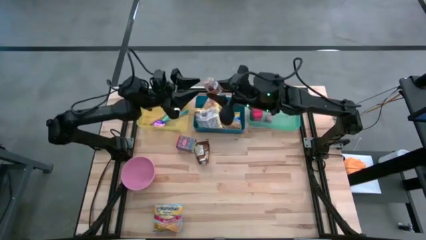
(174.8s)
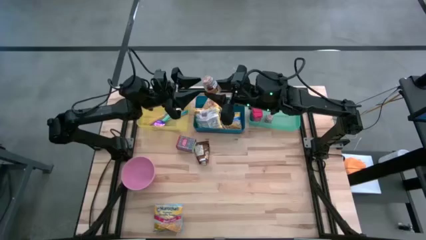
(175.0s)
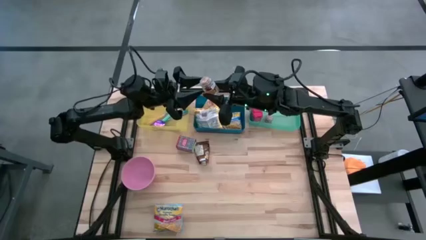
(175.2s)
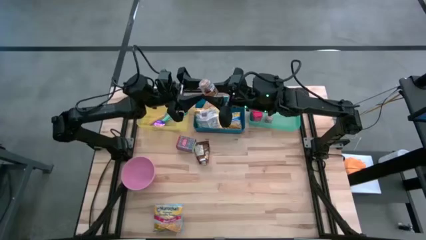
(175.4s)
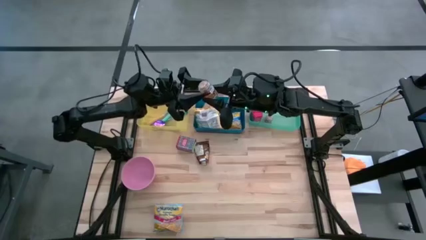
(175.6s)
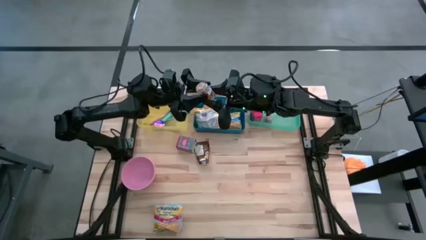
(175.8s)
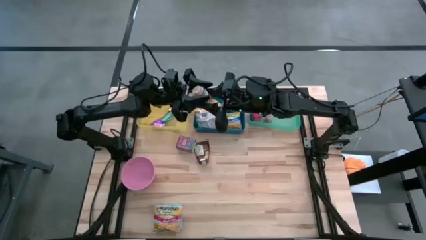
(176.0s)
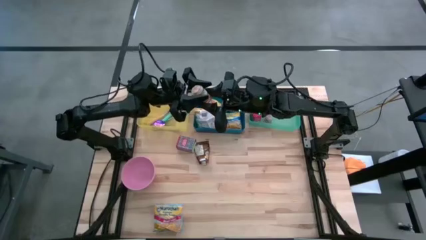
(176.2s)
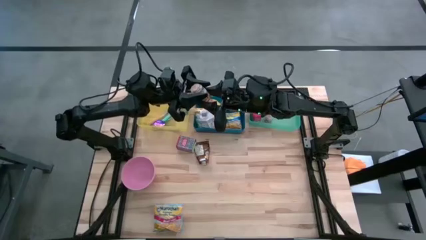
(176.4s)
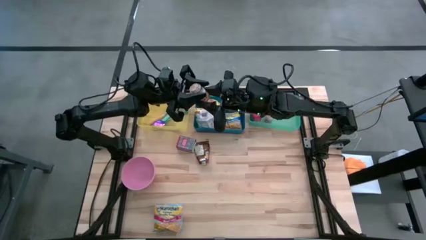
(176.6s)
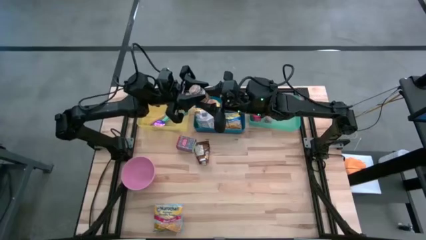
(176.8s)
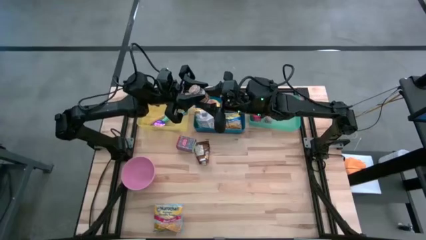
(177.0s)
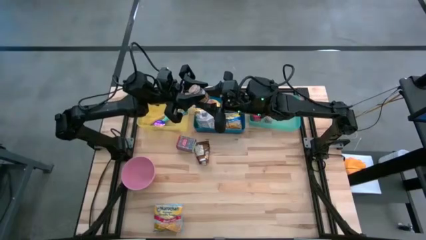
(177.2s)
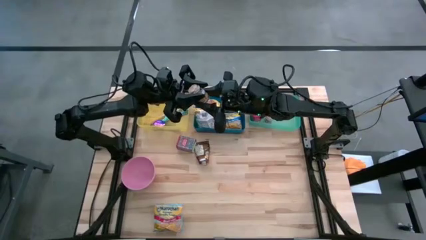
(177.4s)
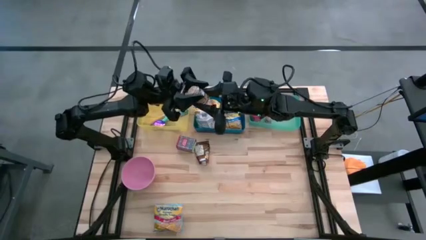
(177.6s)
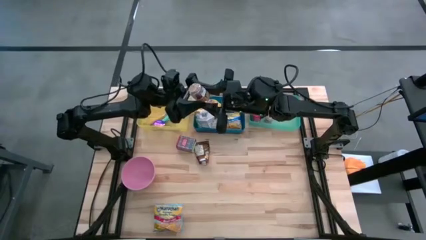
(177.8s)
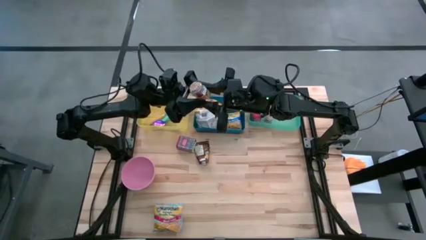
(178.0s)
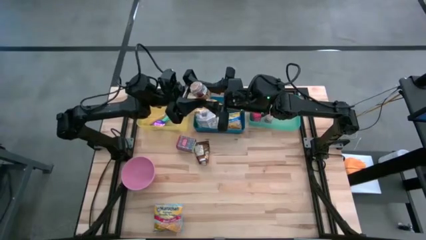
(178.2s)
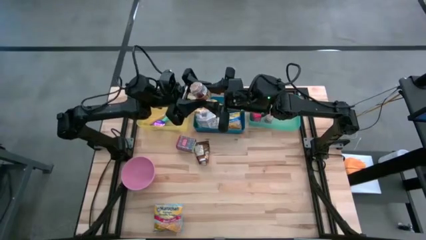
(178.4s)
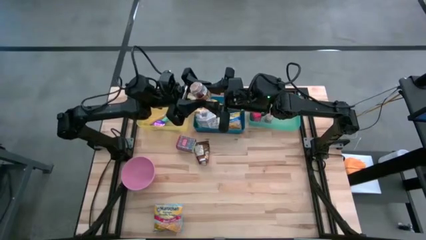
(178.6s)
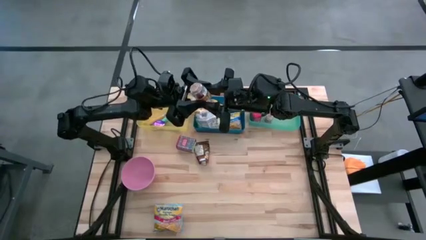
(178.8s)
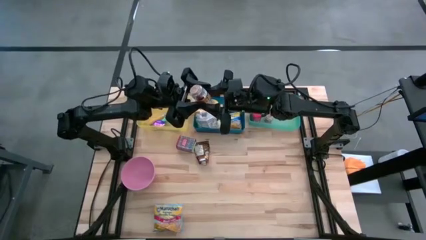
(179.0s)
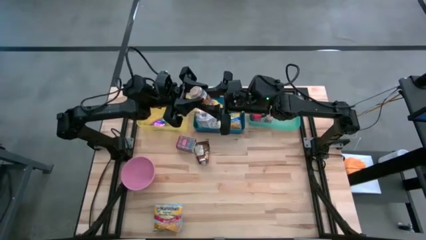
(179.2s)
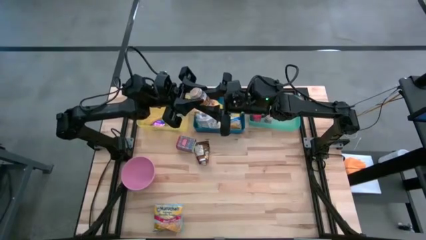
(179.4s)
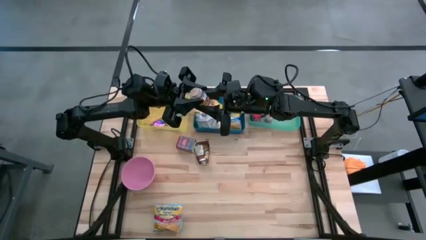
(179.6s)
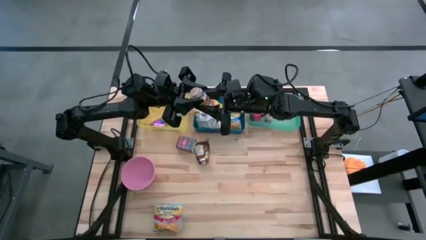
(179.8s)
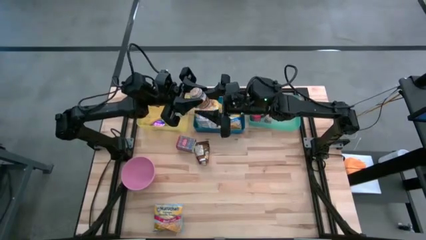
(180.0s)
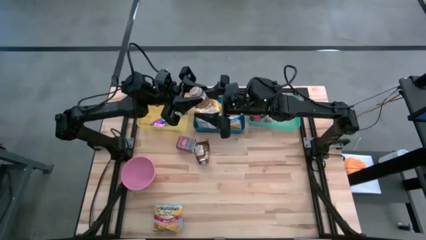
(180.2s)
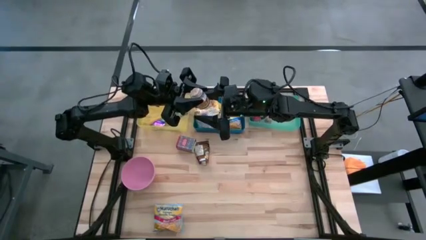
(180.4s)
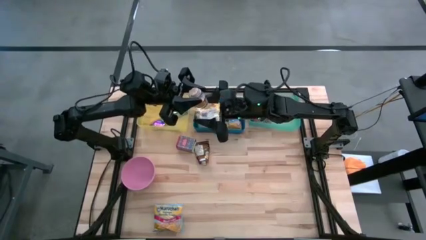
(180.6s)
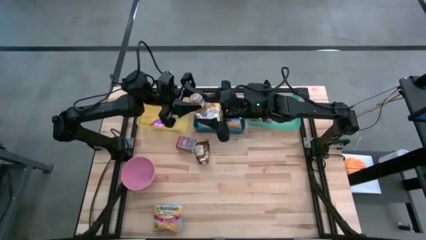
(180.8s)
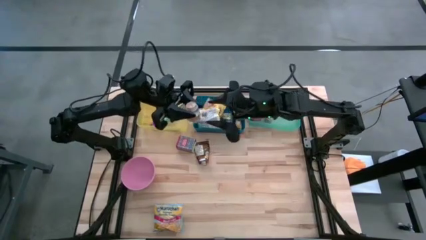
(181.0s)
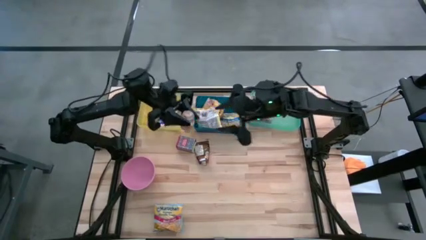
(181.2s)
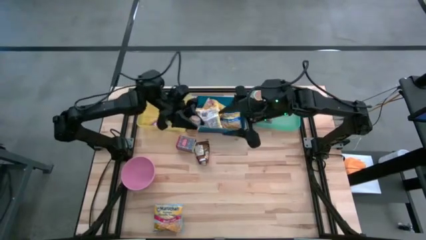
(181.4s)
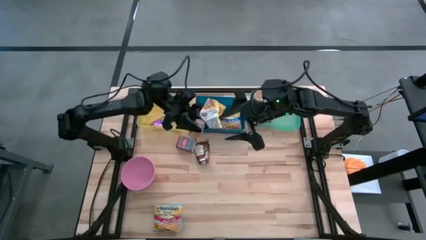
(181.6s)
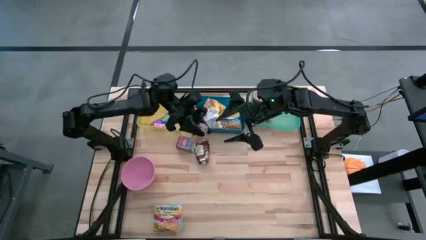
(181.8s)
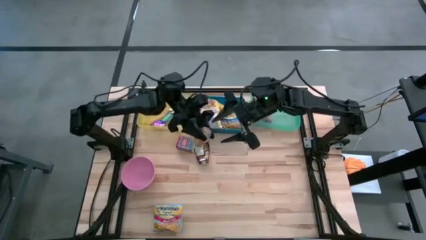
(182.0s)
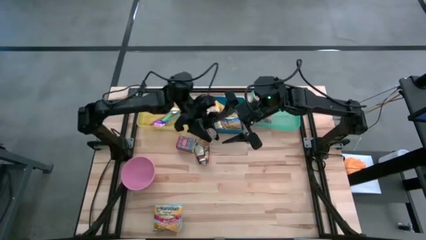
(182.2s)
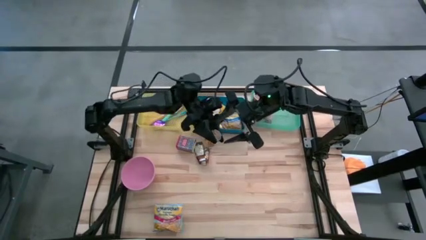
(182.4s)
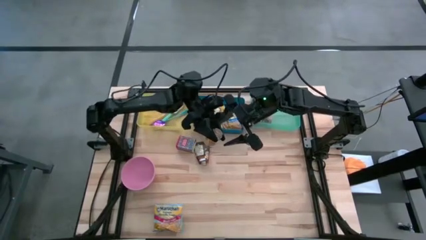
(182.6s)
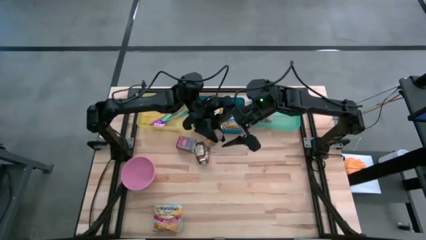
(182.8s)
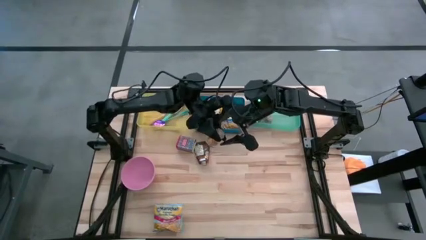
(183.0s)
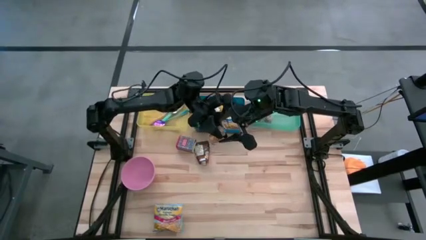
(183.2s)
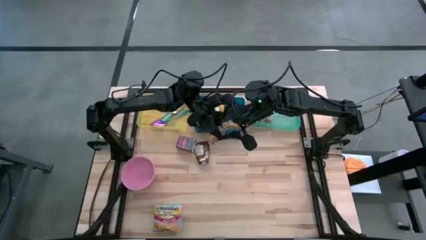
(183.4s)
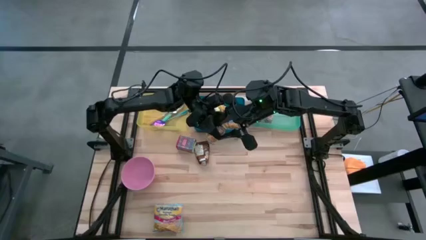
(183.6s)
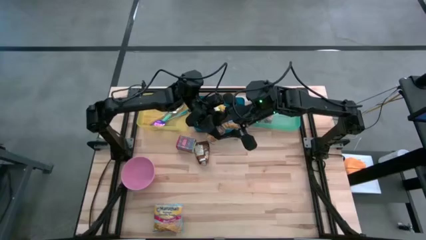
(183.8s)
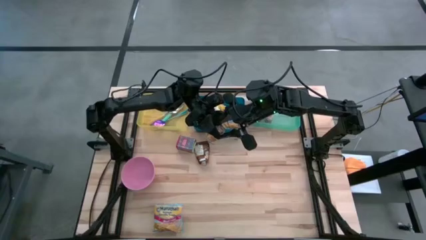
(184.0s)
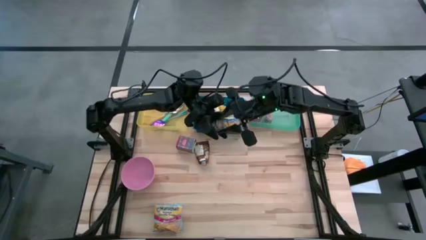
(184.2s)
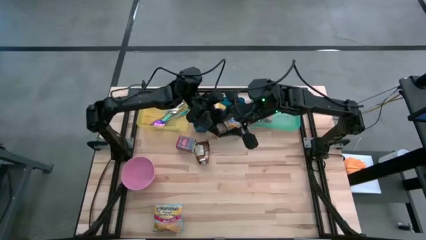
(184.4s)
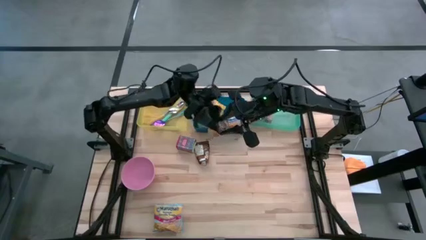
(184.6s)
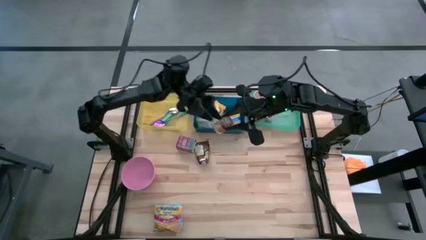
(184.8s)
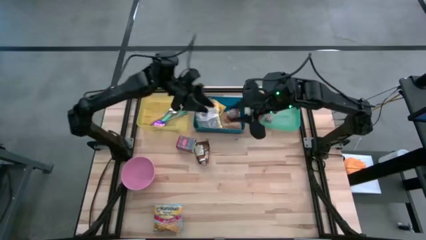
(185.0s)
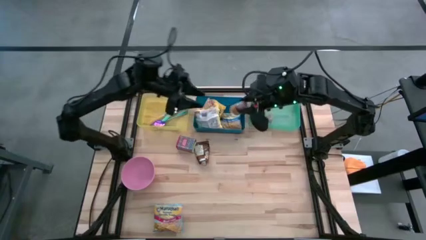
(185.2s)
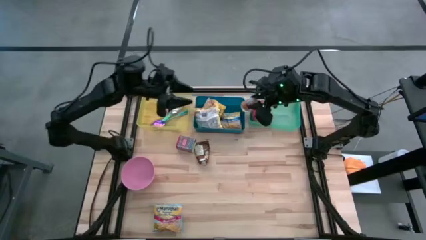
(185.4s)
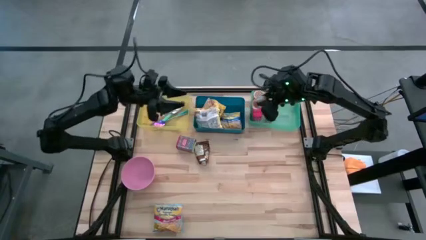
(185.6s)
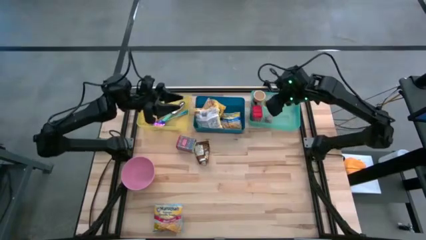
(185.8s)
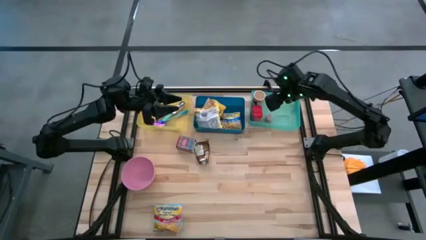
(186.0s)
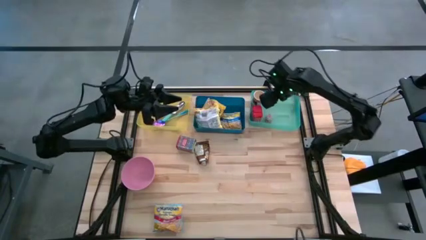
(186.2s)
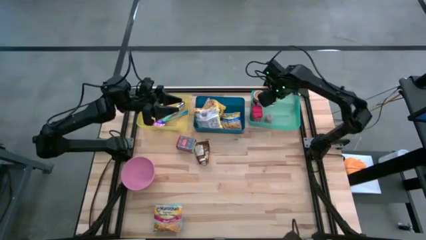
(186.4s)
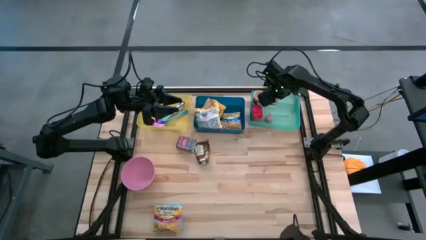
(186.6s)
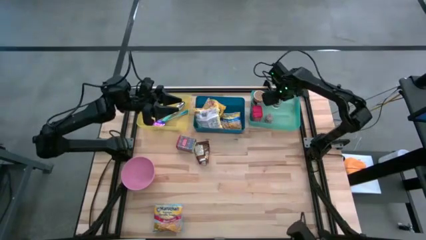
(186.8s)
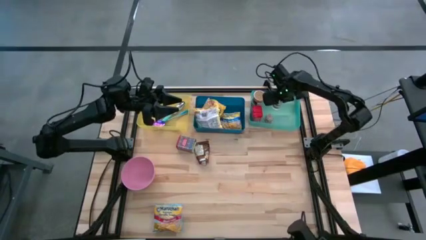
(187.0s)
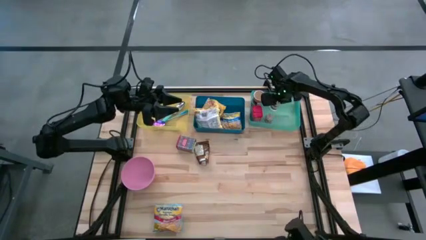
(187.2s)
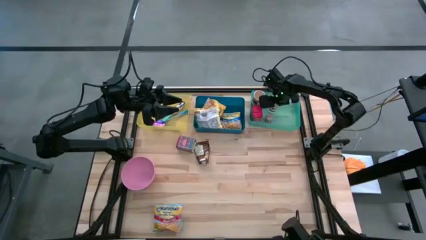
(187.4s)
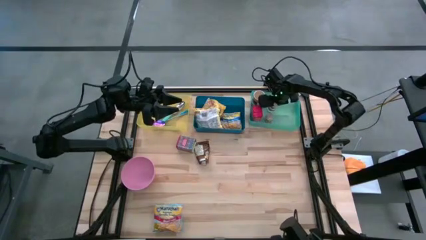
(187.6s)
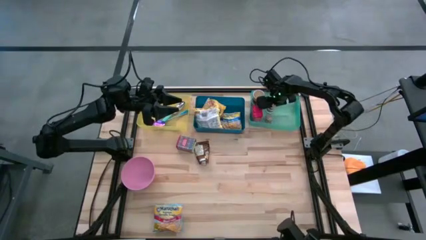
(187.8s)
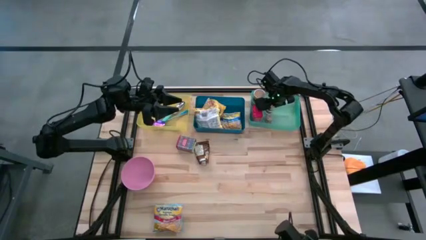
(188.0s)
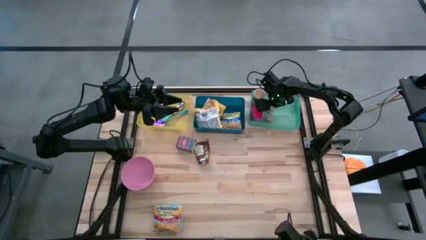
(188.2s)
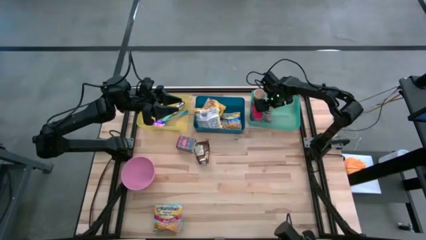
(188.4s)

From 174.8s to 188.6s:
Put the brown seasoning bottle into the light green bin
